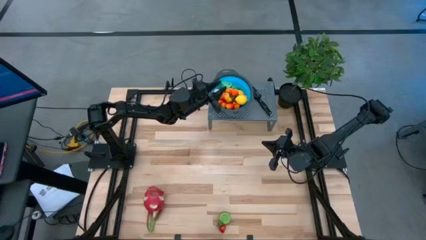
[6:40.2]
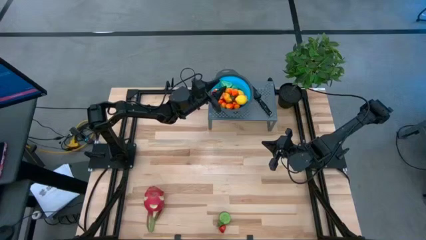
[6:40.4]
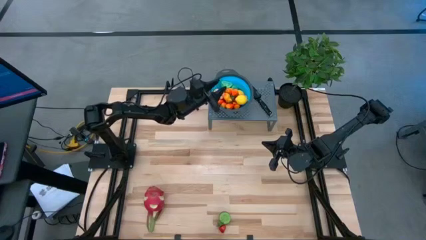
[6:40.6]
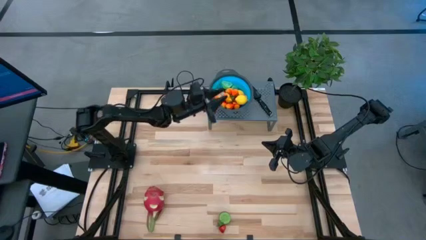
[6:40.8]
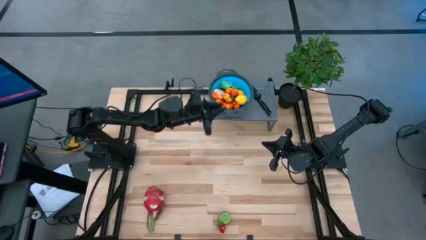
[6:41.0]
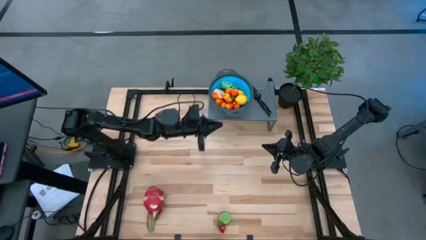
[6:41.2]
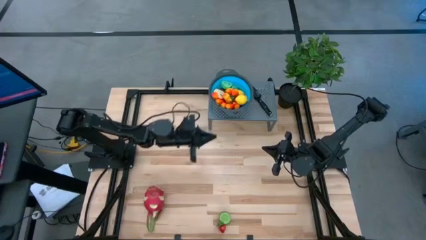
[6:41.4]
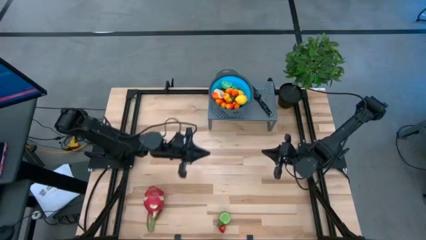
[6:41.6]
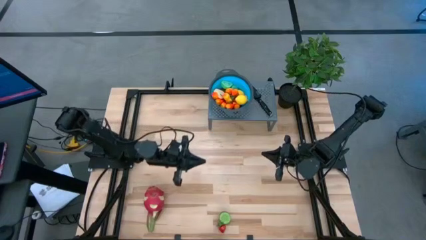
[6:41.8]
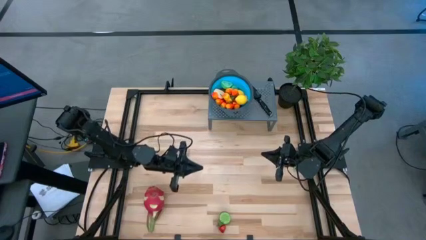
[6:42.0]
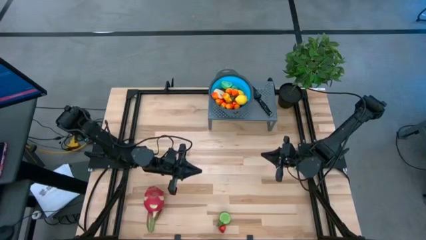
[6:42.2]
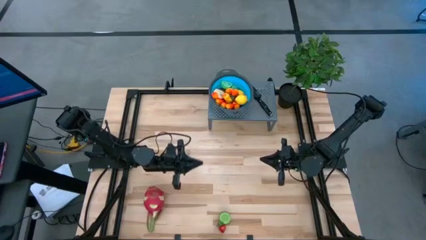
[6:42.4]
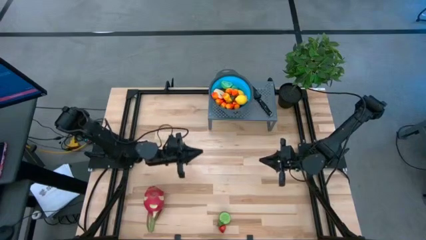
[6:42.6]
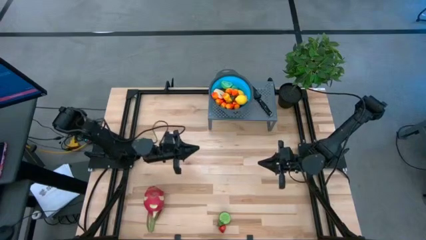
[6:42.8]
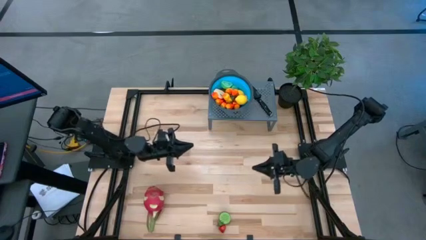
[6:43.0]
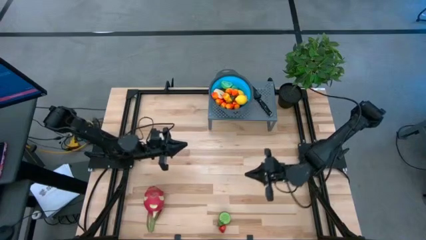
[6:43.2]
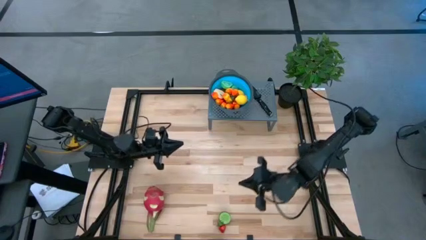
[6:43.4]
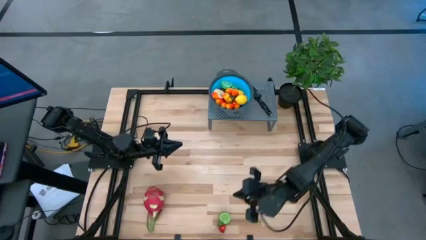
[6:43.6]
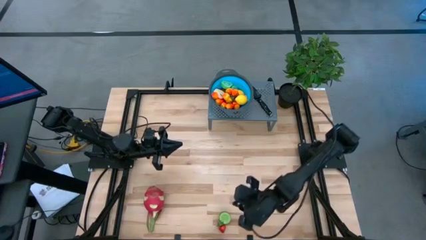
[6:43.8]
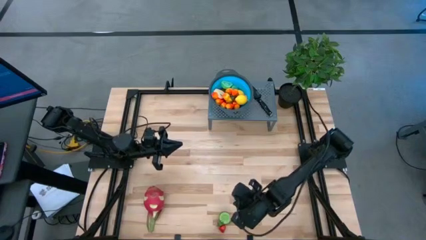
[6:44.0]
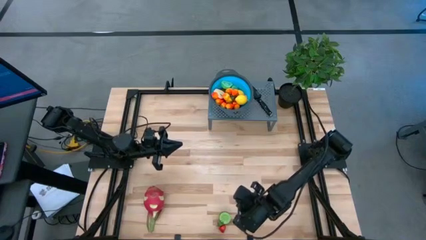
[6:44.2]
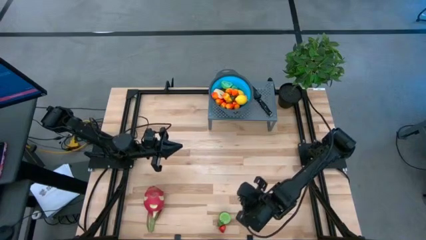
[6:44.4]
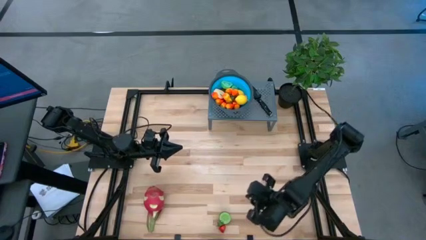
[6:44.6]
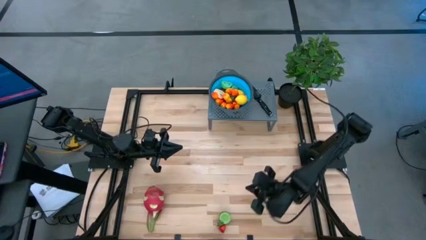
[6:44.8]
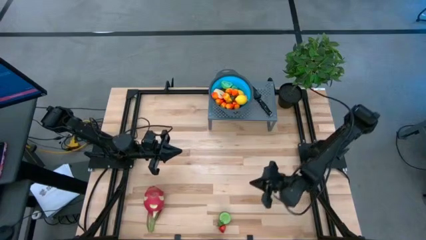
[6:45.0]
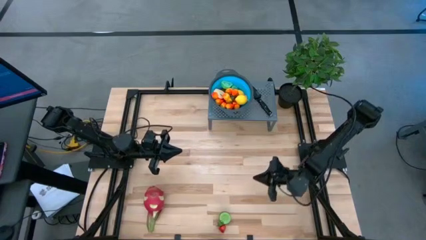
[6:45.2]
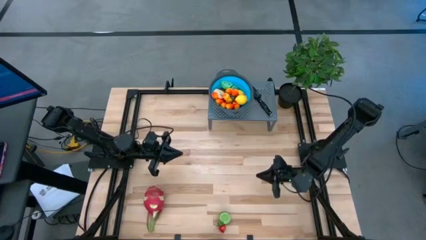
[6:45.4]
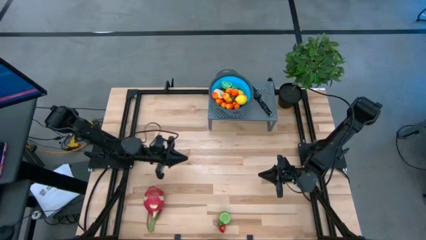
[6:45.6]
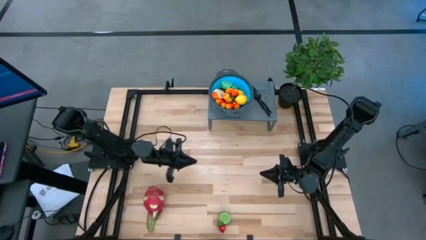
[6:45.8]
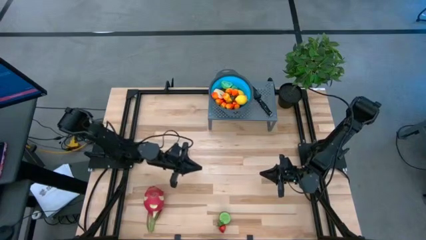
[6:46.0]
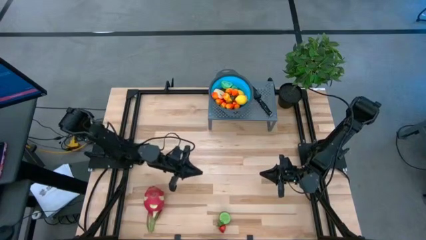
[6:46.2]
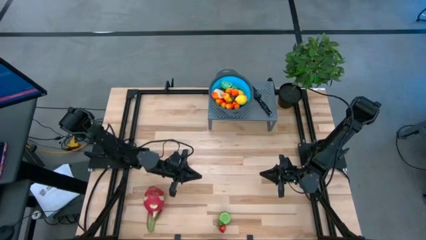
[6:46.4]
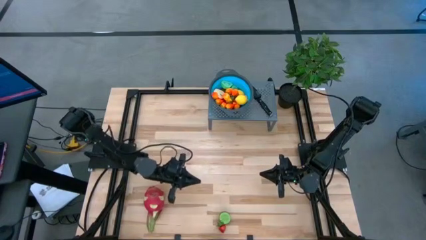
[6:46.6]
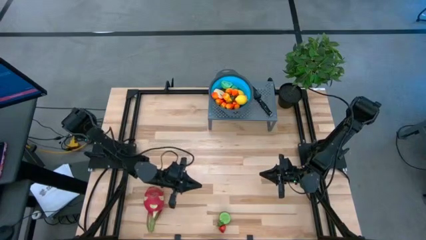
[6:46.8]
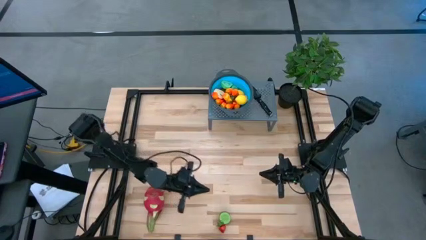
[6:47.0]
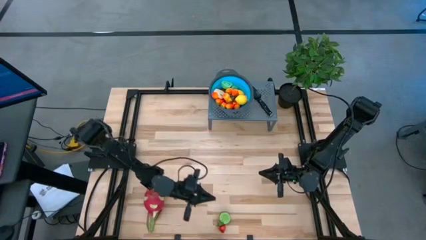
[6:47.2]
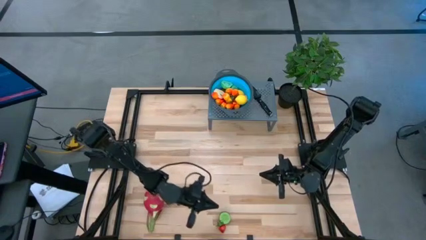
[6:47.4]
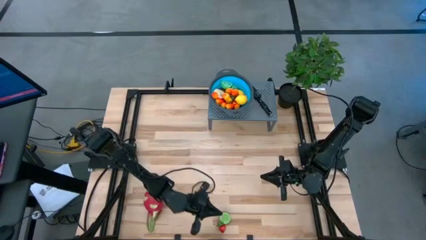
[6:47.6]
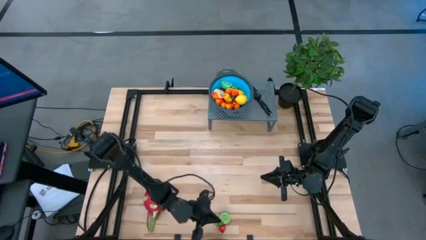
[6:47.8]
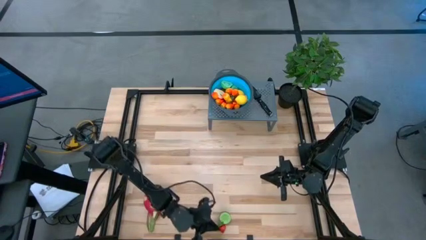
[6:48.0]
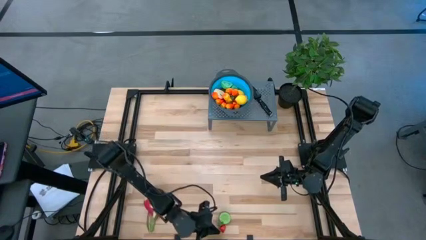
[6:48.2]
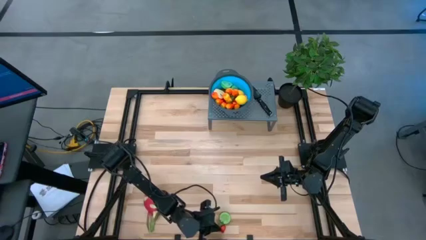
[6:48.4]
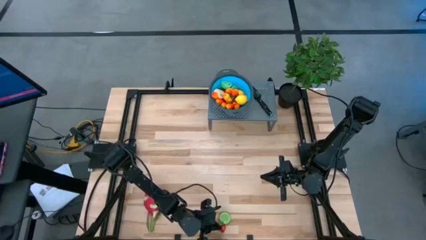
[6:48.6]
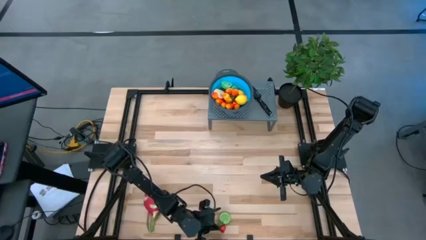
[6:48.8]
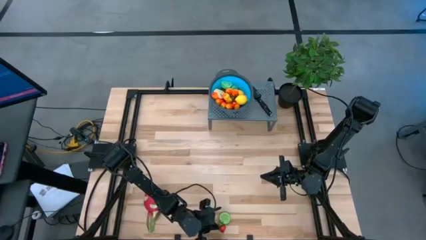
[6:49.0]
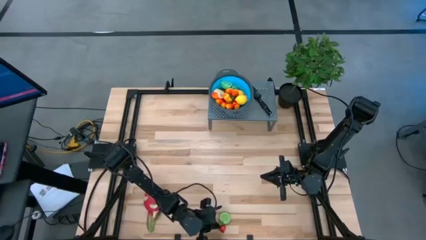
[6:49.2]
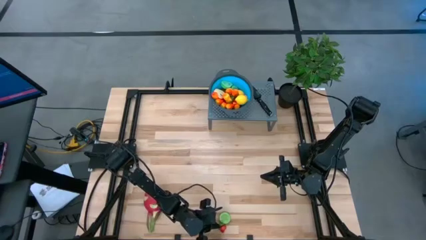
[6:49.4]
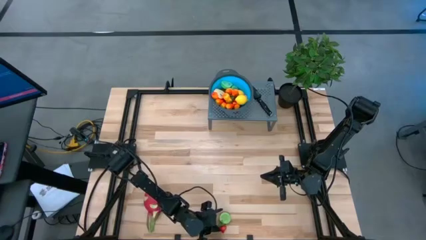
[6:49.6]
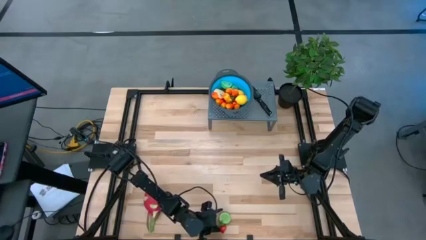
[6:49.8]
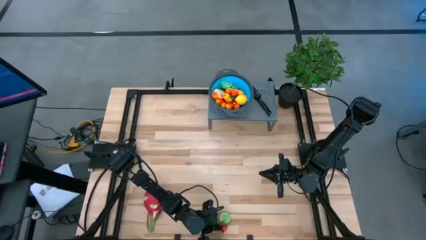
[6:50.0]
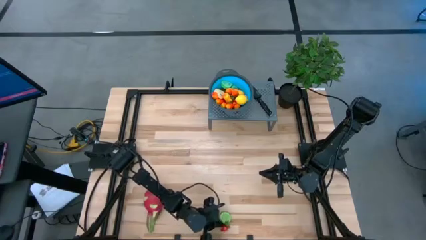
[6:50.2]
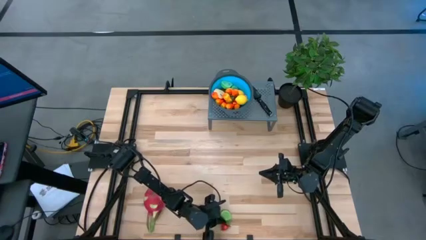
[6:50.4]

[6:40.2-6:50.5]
Task: Pick & Place Fruit
Put the kiwi into the strainer bowl

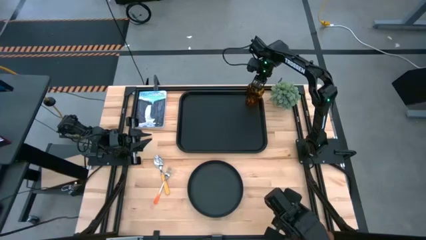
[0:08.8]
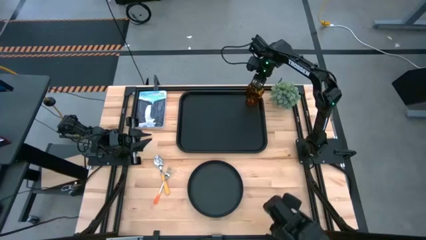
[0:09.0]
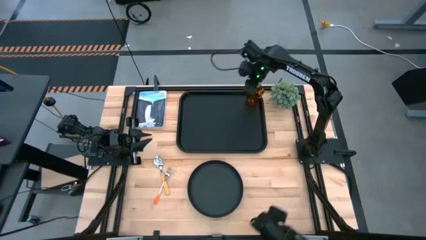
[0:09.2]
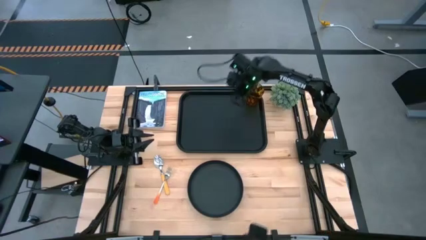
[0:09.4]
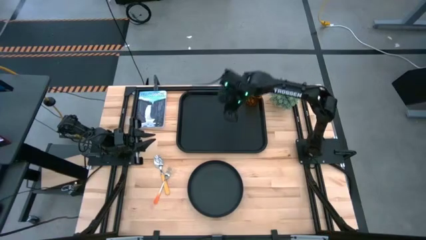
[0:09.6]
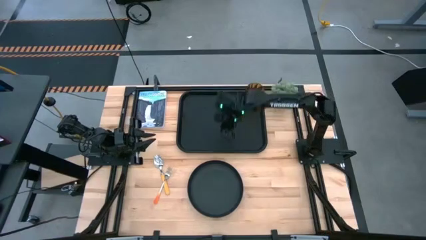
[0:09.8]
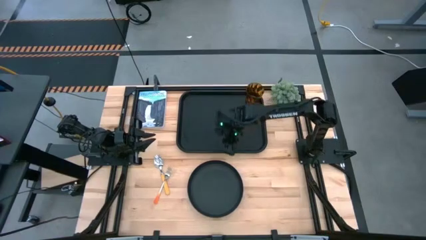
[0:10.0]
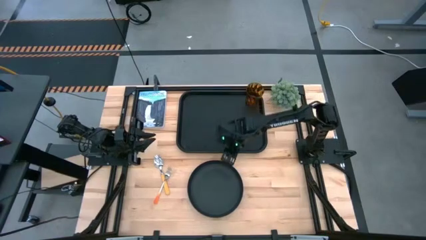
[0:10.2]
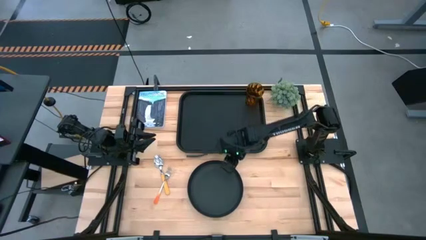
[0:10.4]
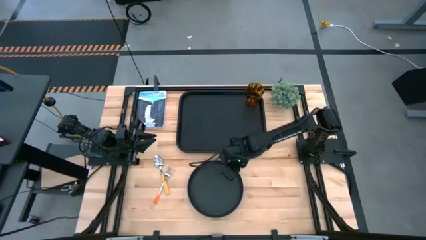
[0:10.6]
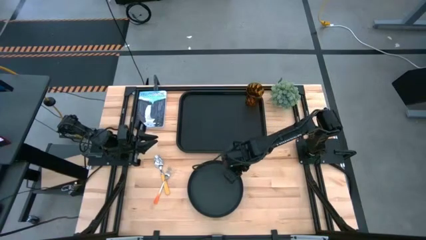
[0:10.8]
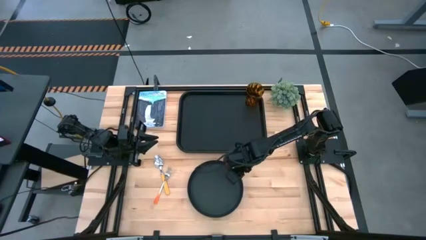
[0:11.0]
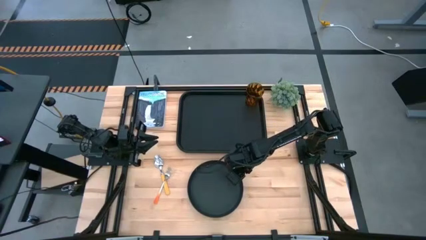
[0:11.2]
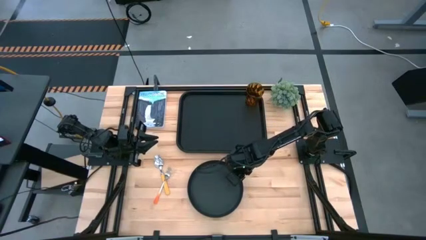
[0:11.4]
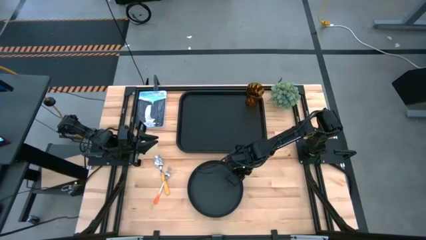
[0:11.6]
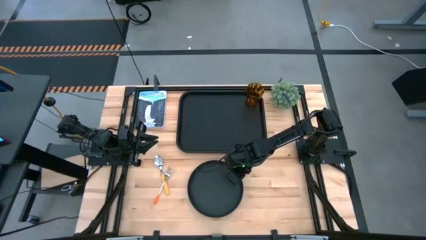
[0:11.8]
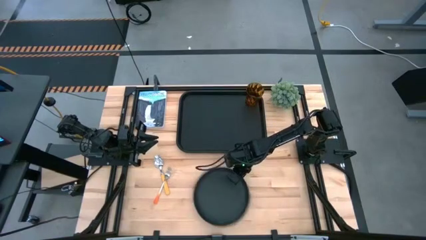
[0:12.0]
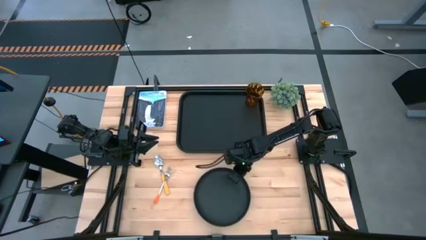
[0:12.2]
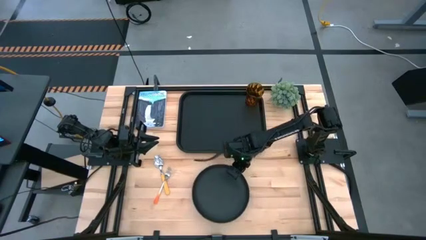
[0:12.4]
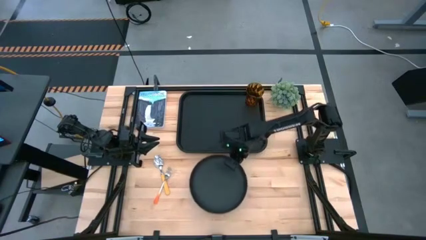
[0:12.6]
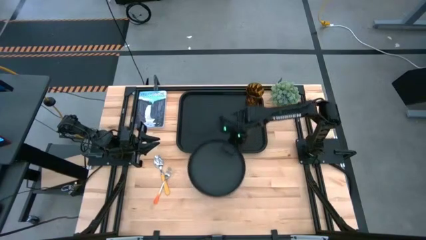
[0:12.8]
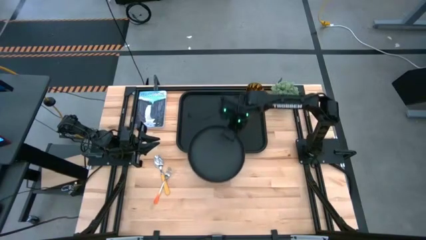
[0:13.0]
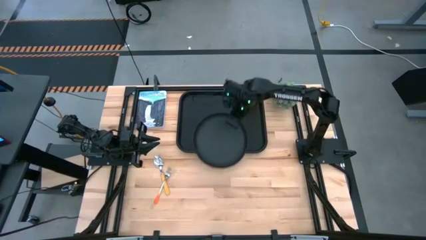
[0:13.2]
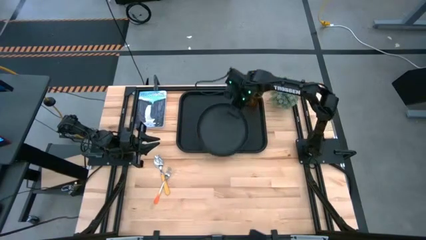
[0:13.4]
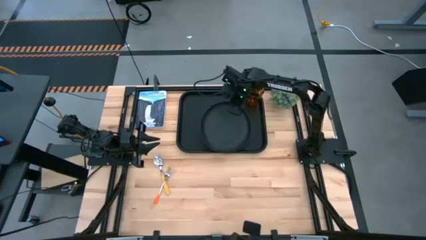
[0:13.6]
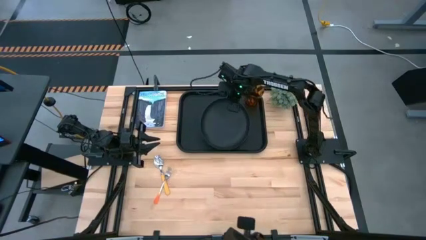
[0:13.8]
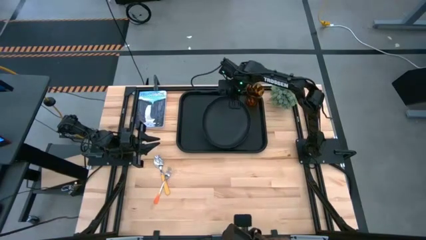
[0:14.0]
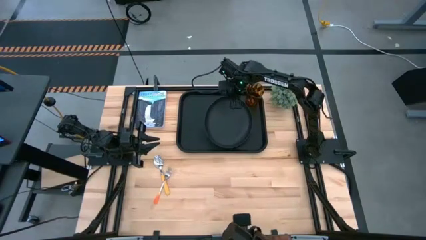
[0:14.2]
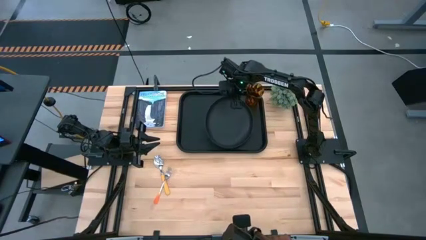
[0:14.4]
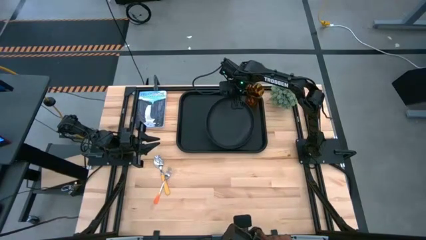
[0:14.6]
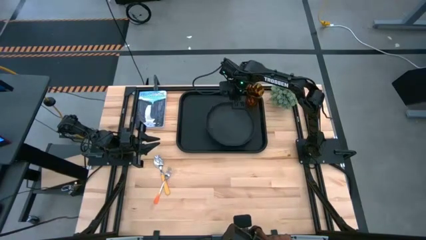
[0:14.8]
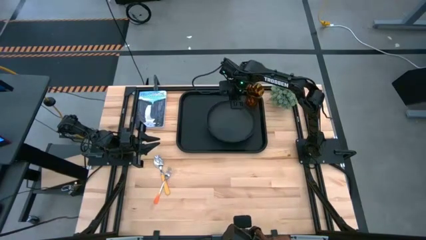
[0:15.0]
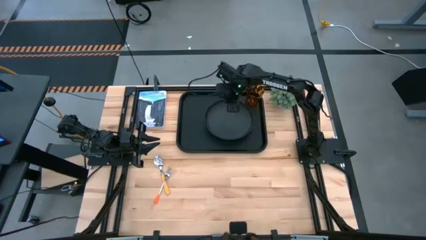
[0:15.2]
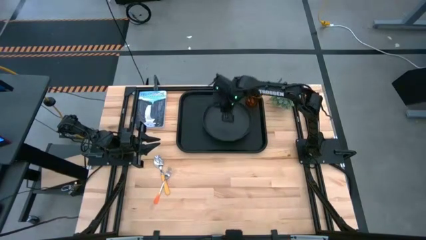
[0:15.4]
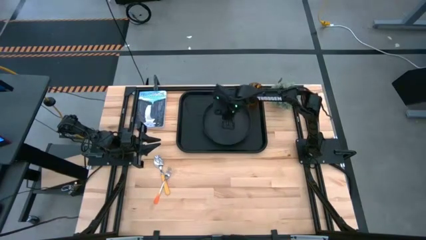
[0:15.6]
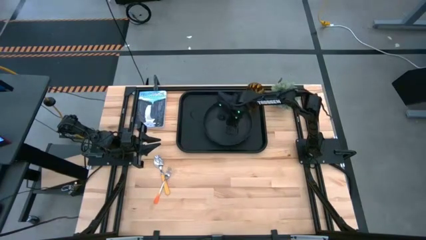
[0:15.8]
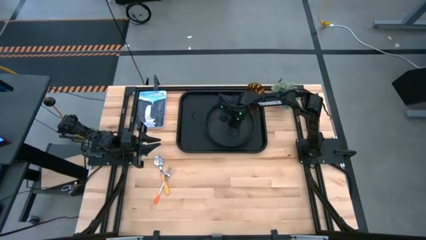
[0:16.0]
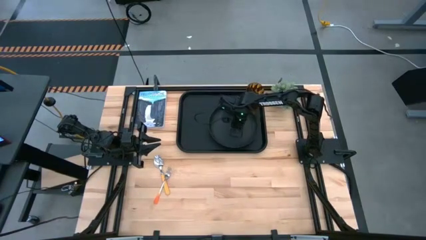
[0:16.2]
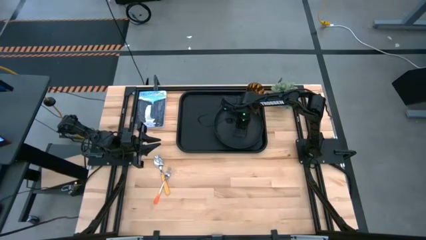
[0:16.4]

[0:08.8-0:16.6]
Task: Pick and place plate/cup/fork/spoon on tray
Put the black plate on the black tray to the bottom left of the brown cup
